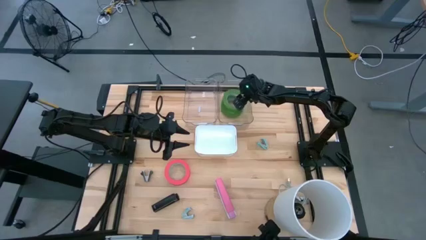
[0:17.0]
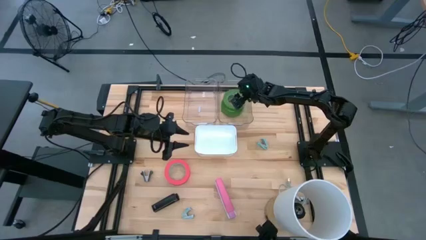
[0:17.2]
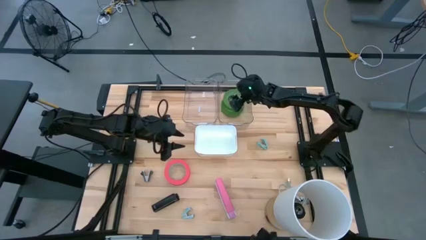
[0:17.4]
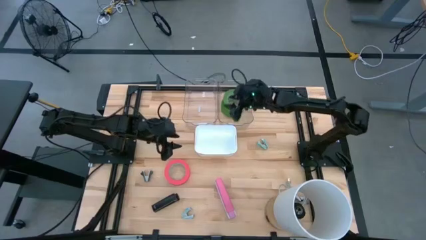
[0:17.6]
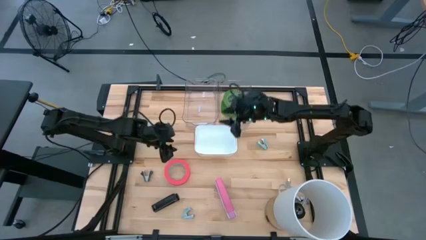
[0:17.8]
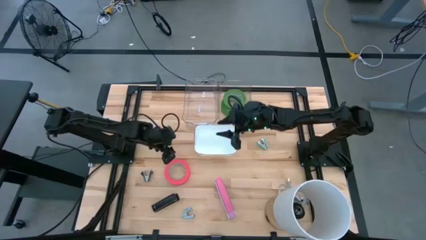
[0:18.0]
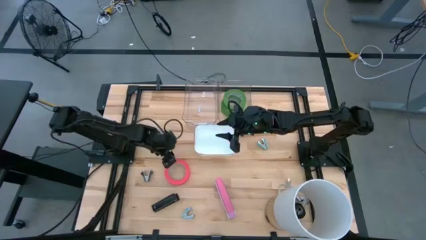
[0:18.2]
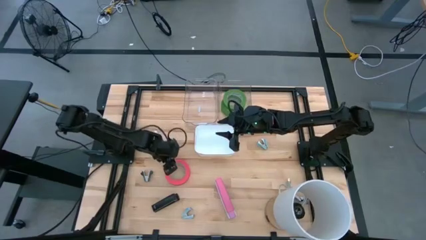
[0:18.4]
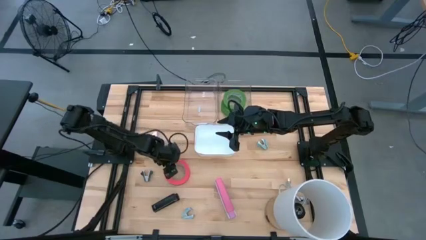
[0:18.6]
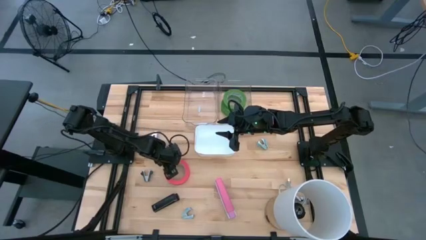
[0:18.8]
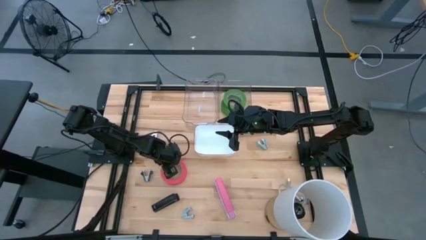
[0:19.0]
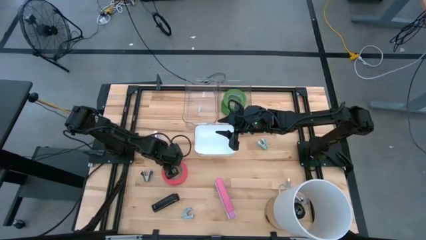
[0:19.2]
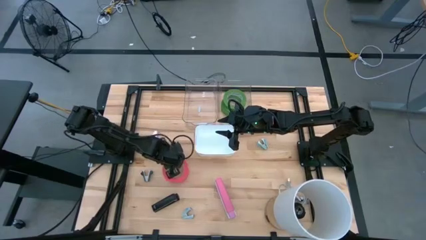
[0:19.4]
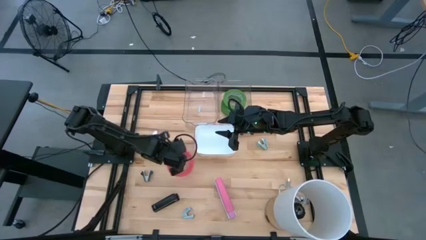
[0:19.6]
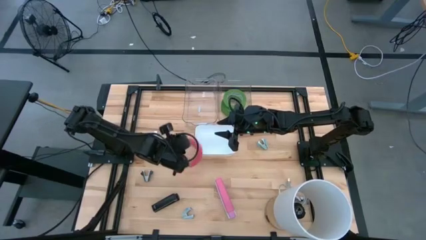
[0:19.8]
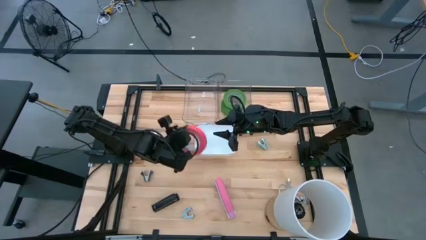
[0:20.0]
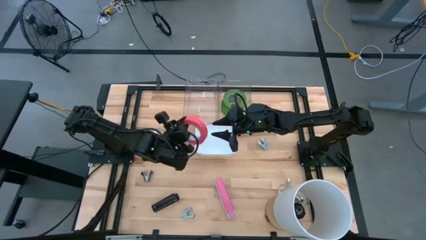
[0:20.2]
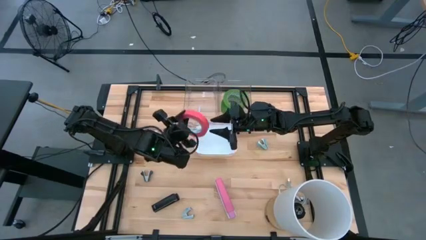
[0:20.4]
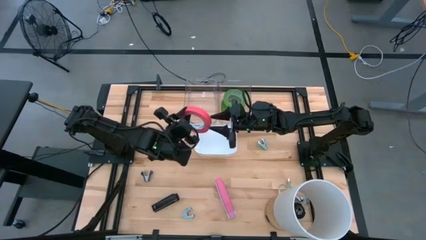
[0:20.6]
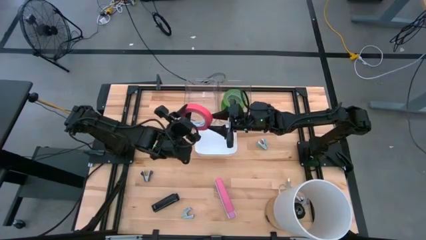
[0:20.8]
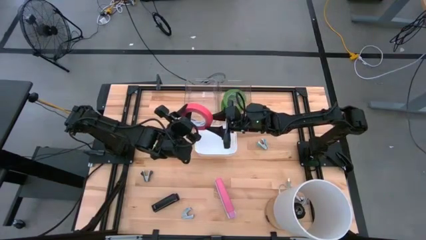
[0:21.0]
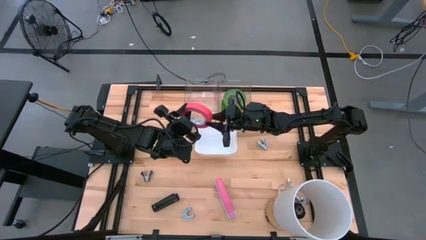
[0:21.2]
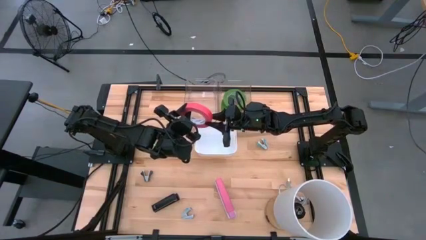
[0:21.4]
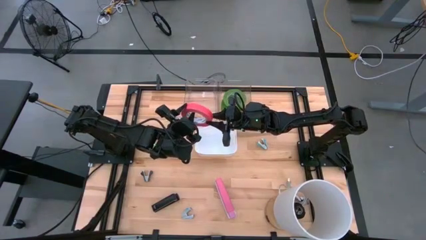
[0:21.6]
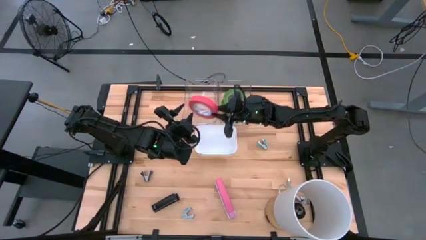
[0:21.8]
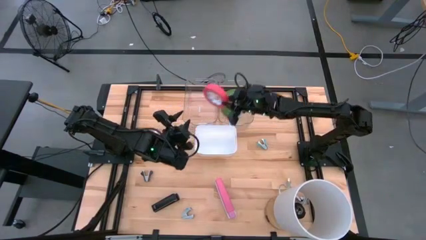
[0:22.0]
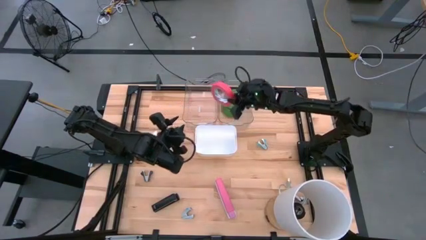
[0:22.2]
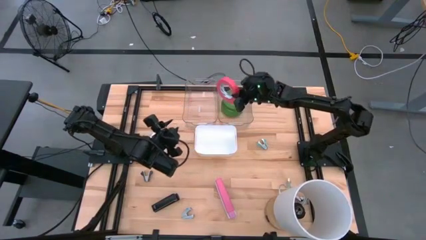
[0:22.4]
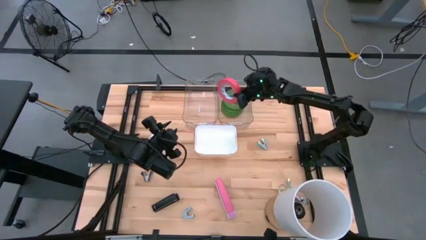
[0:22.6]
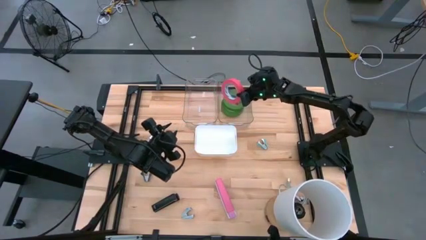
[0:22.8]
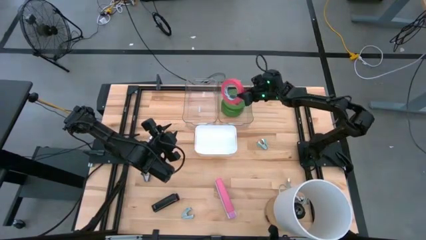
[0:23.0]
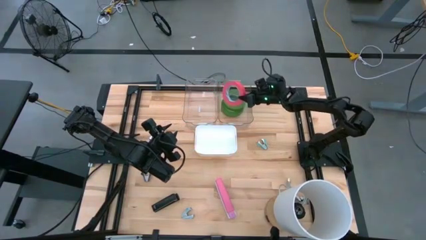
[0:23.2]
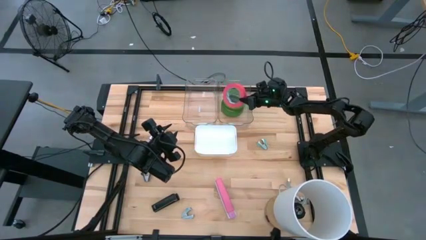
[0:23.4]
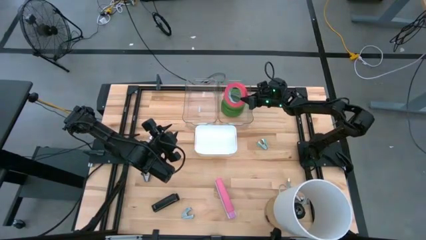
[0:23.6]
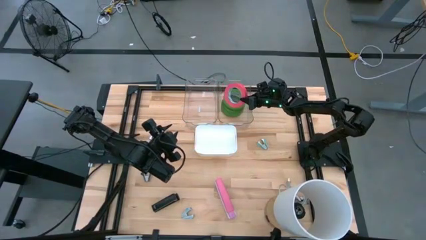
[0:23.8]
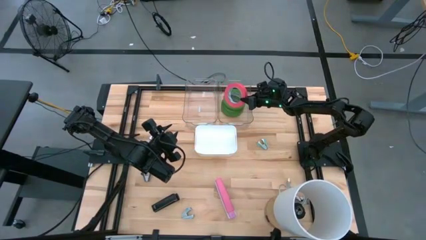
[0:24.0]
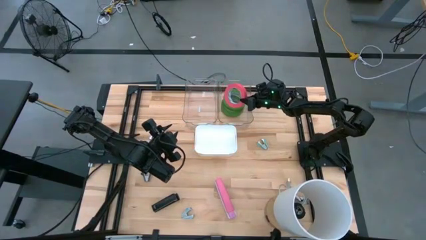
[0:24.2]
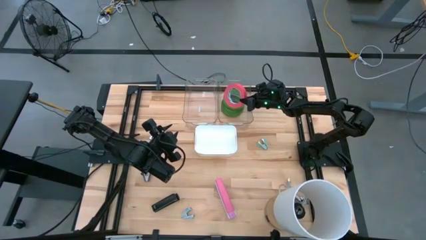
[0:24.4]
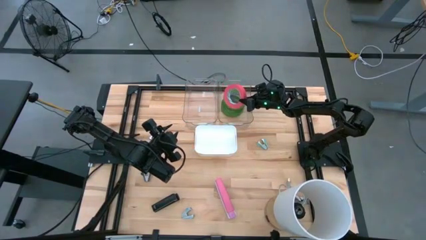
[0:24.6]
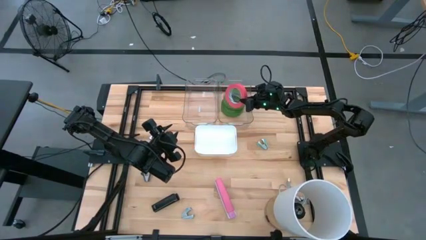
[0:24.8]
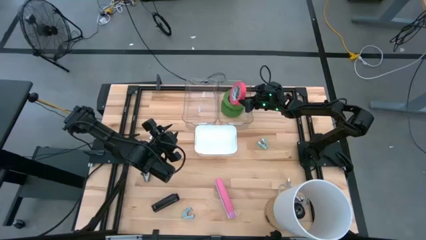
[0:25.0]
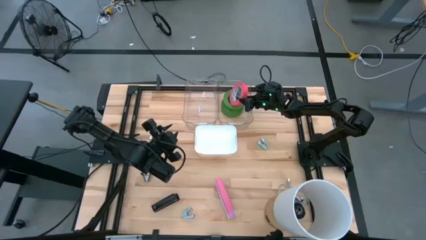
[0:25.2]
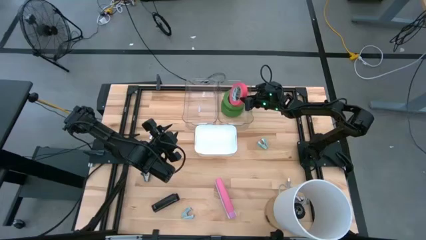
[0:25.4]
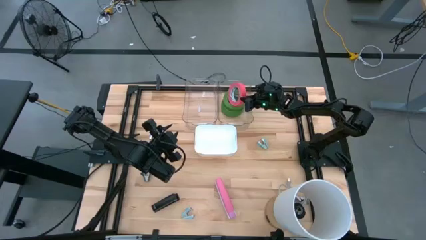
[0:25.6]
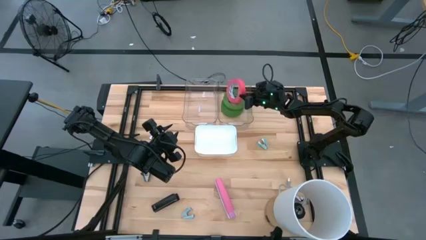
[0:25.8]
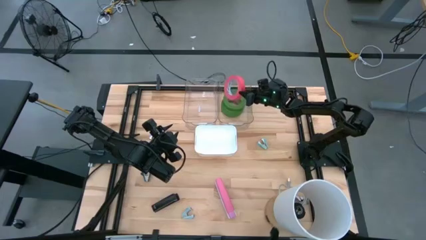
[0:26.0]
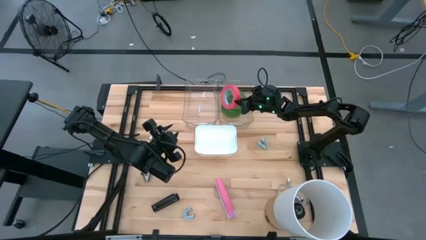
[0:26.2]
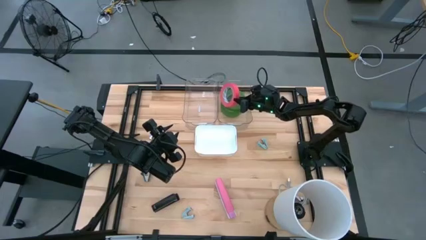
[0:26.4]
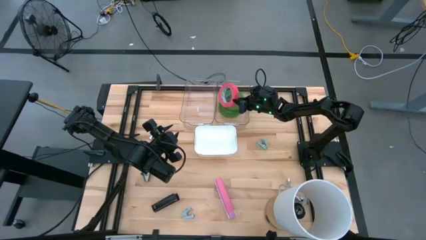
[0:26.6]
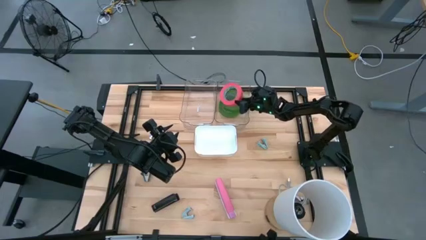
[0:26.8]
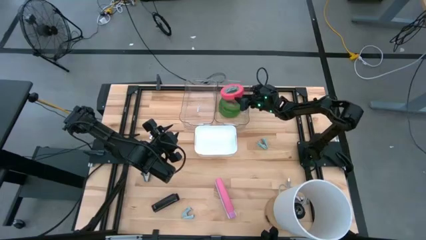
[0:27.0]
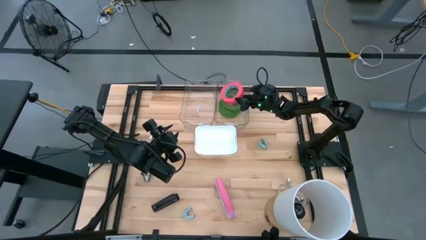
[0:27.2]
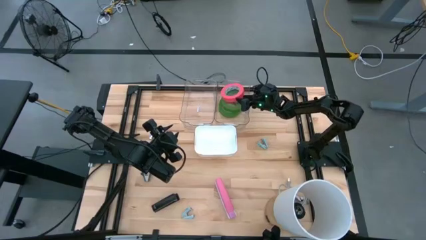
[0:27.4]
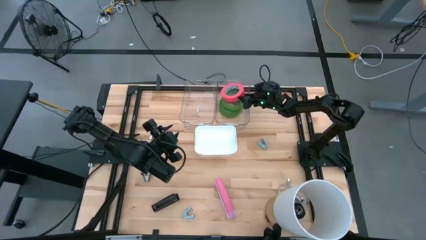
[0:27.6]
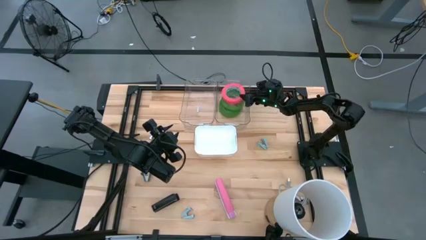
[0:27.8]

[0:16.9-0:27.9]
Task: Pick and place Stapler, Stapler remover, tape
Put the pink tape into the right transparent bin

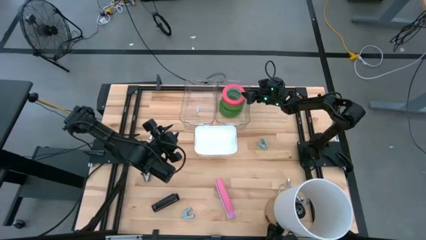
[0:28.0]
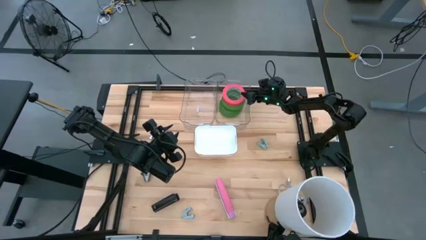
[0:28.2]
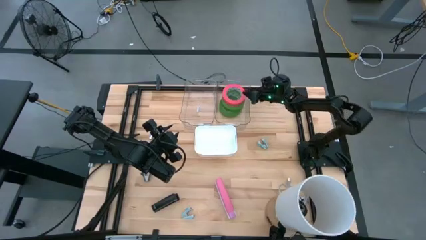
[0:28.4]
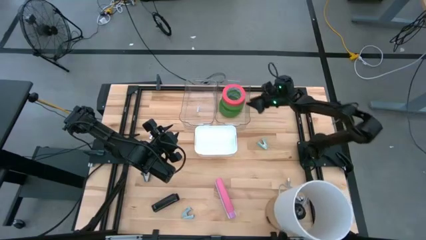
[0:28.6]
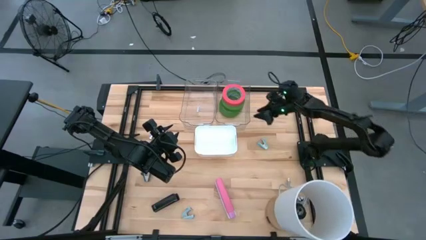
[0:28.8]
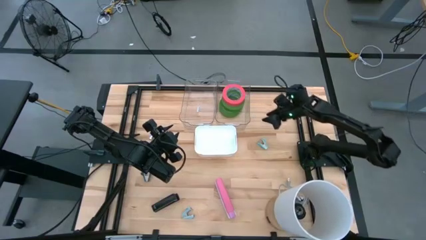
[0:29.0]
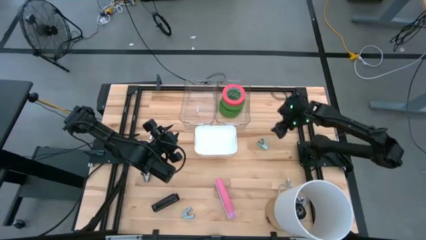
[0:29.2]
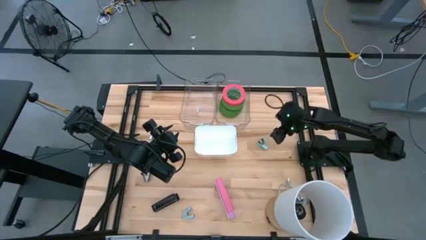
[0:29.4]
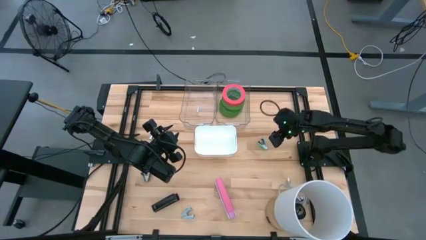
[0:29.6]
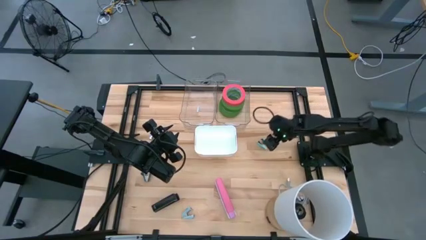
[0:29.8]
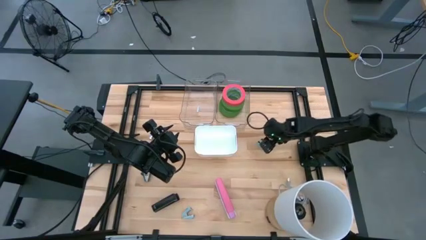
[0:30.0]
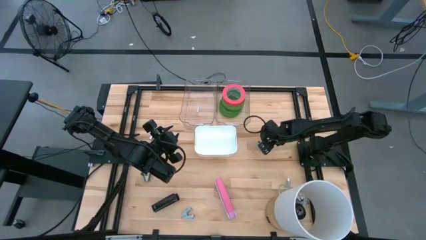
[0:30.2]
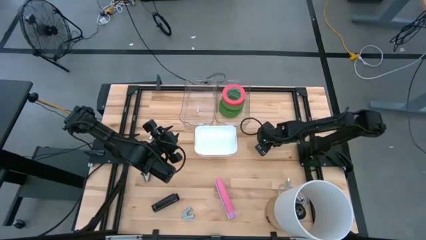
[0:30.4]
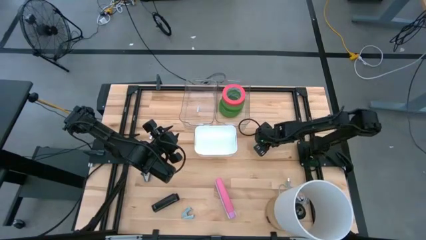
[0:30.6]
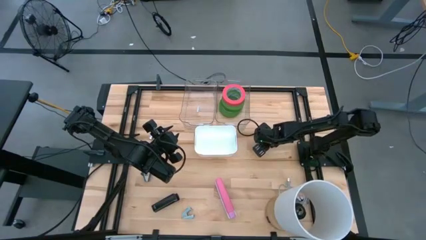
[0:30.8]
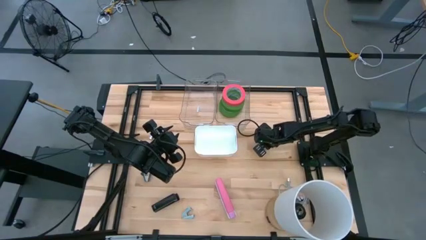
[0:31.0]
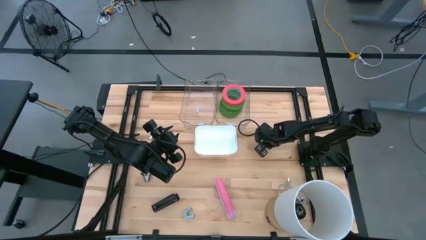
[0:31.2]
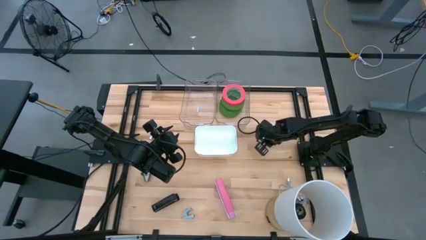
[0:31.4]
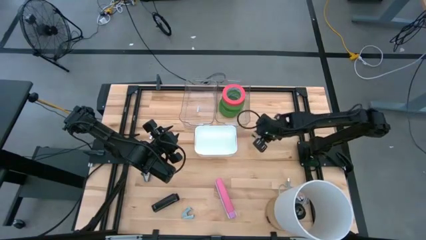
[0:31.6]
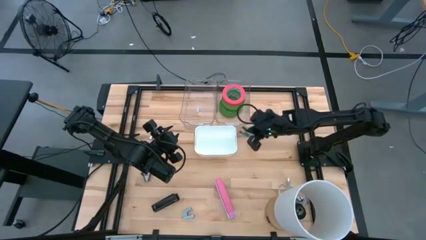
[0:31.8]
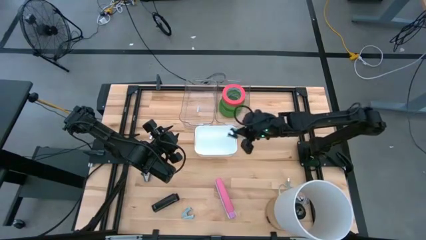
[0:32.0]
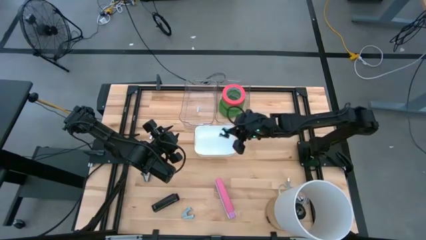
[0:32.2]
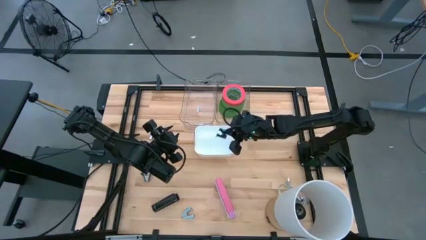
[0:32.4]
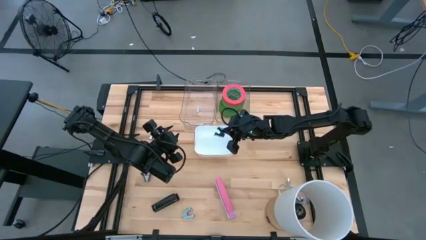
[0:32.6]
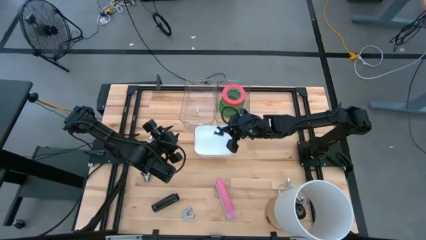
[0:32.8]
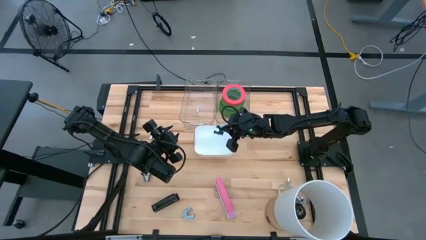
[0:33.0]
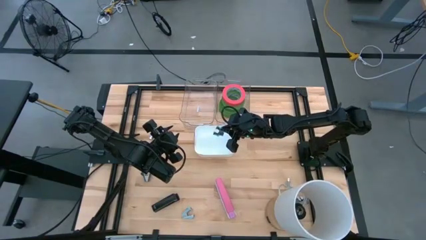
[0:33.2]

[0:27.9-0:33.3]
Put the light blue staple remover into the white bin
